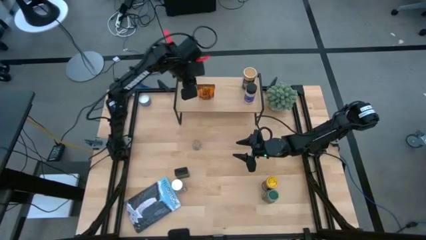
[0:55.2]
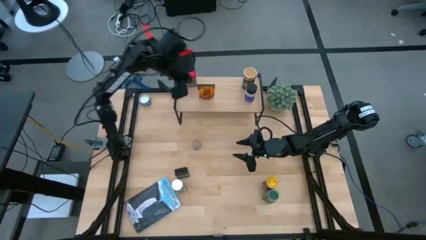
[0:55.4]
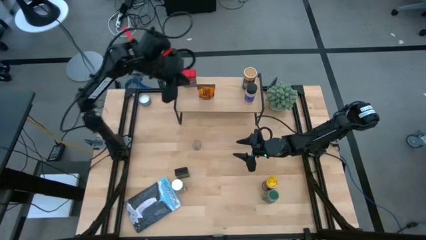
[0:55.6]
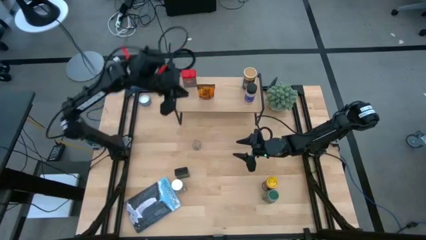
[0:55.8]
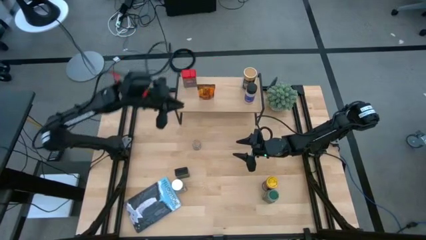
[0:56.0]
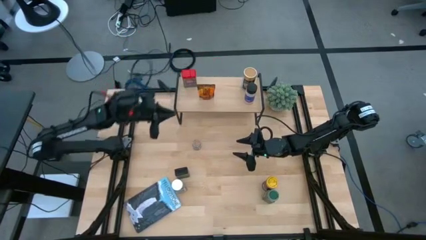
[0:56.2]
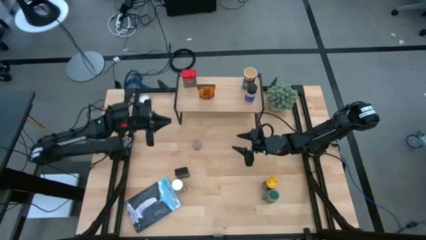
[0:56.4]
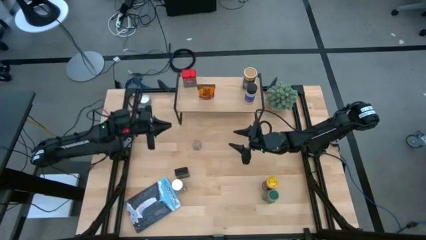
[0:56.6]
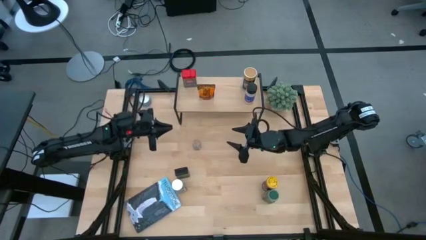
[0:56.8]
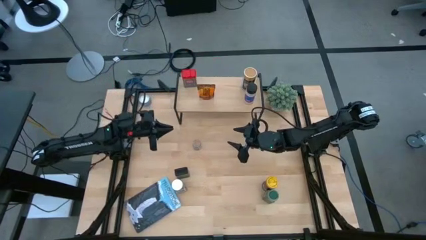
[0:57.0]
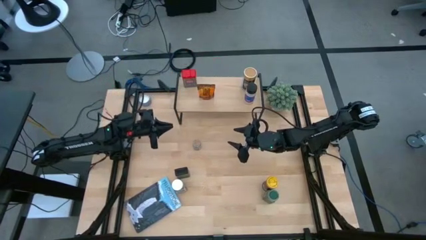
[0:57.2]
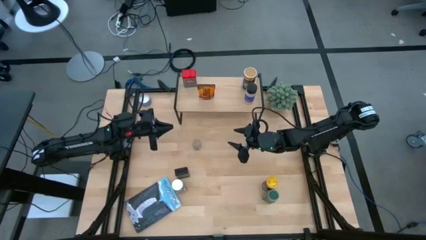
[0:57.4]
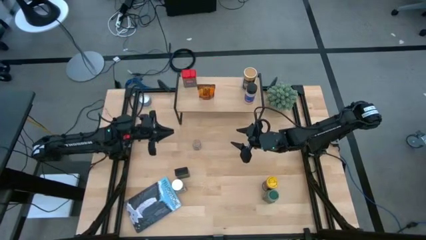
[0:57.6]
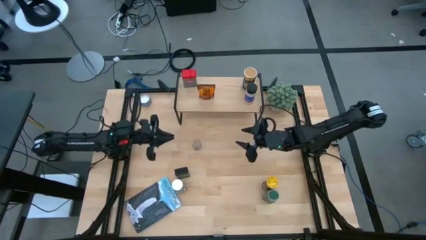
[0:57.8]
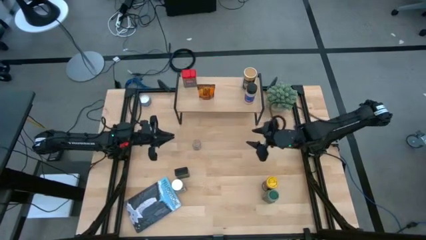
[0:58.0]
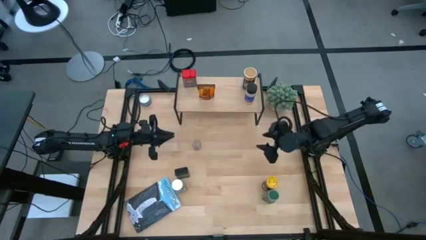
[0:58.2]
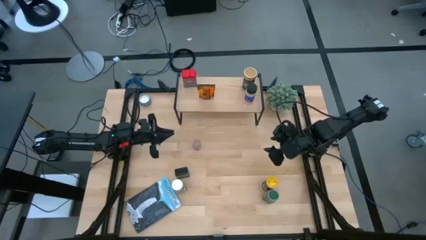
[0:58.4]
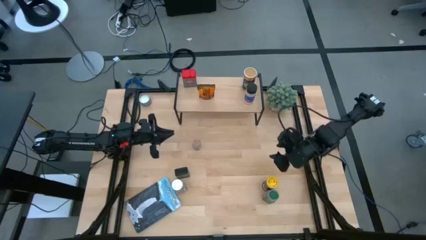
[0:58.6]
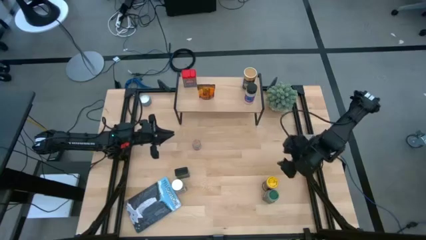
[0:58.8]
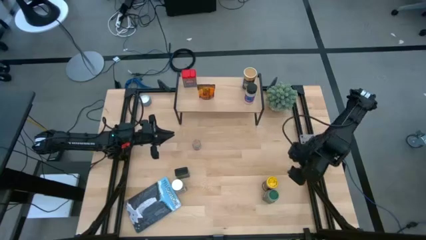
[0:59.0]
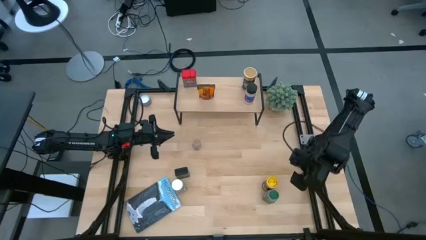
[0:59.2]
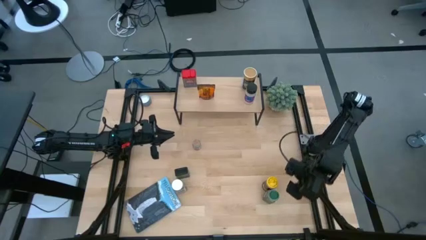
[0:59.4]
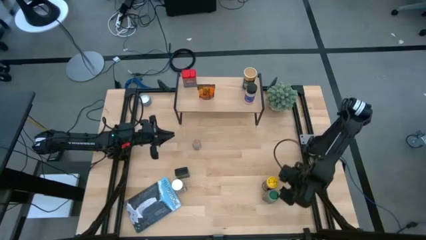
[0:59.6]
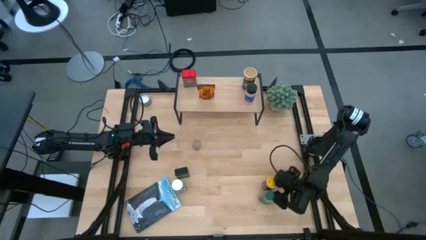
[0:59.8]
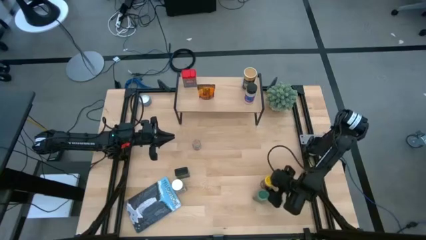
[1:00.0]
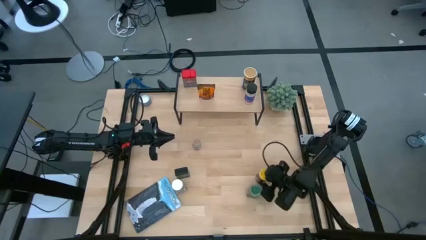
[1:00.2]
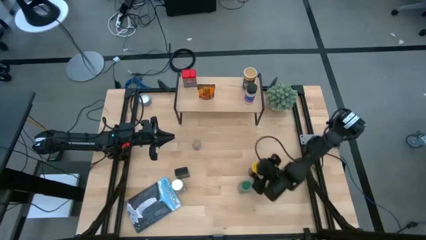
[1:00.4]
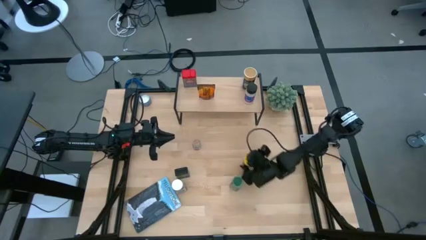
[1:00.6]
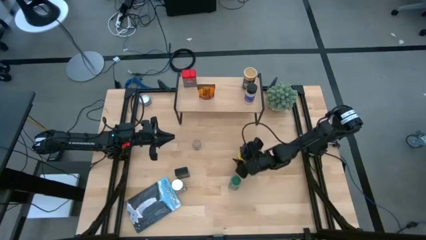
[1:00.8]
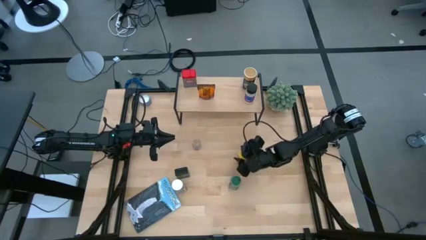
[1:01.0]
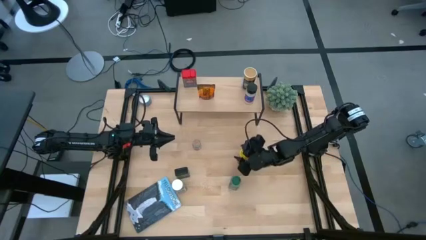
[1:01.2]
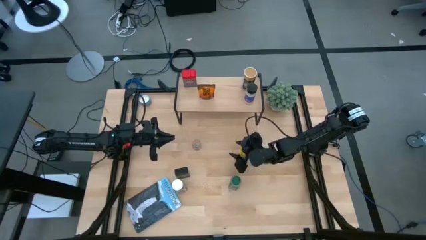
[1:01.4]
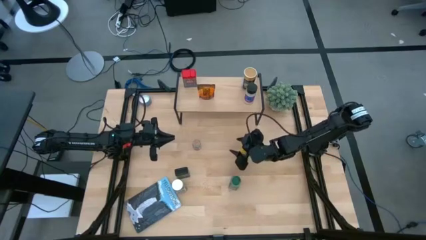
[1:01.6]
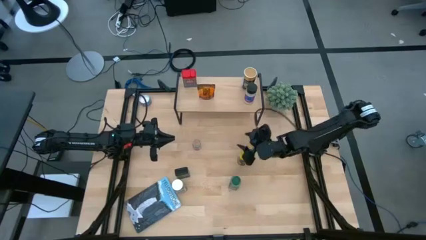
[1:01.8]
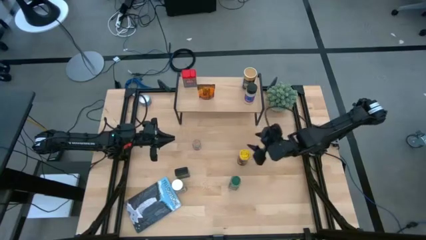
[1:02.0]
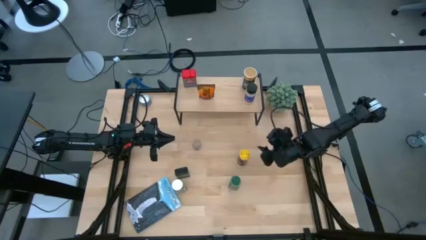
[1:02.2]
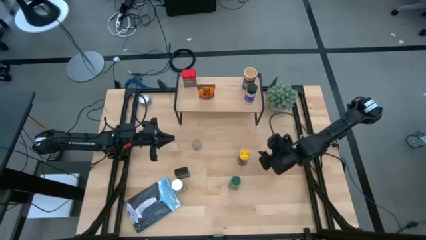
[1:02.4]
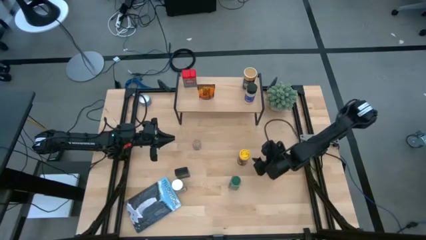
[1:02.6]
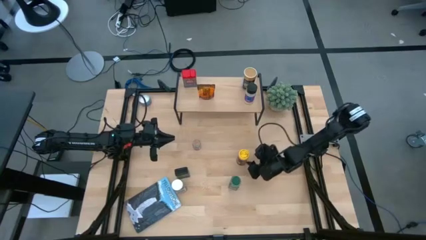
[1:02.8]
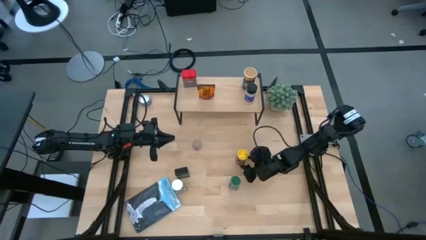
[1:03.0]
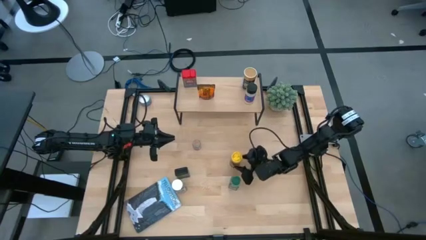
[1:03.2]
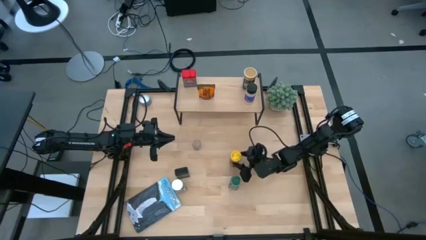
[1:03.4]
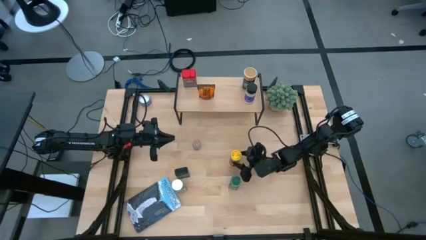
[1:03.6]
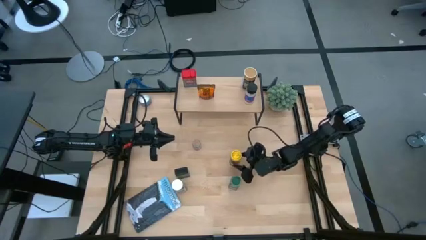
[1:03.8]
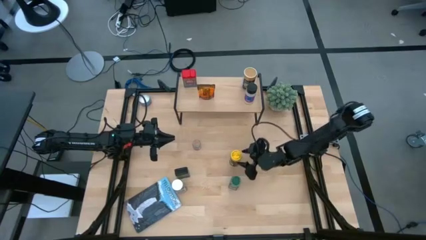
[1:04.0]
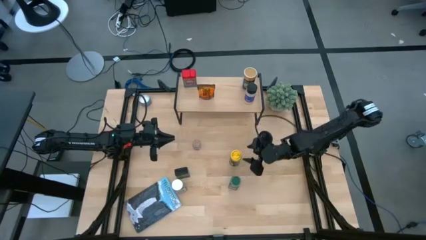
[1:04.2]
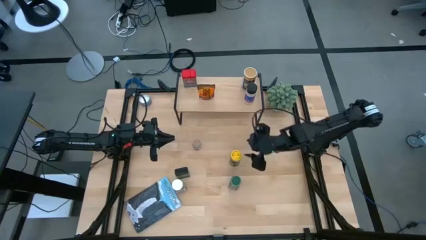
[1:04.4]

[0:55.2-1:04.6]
Task: Shelf spices
Move the yellow seasoning bottle to the center of the table
